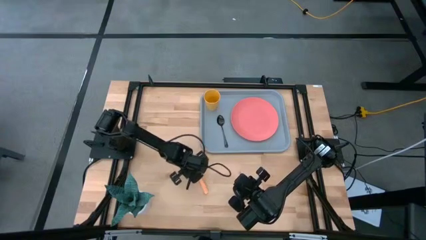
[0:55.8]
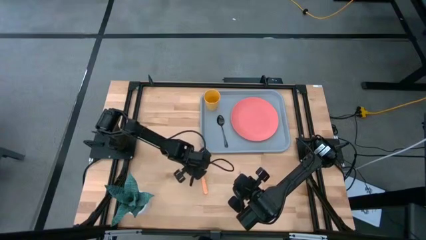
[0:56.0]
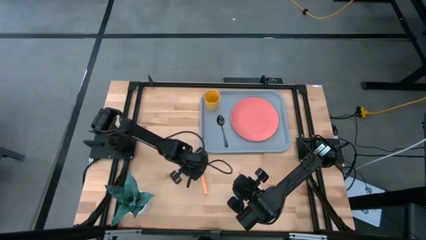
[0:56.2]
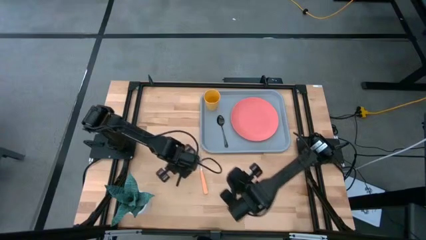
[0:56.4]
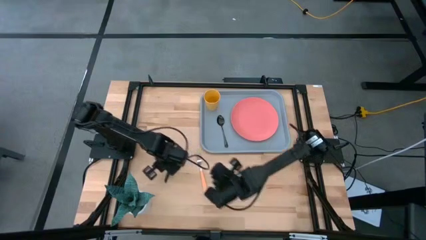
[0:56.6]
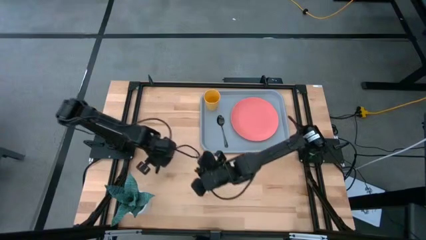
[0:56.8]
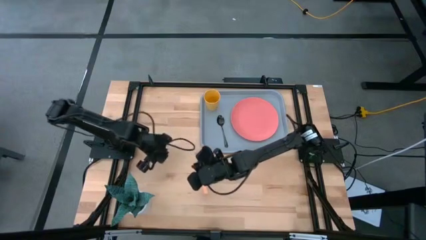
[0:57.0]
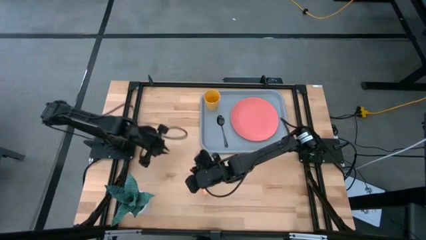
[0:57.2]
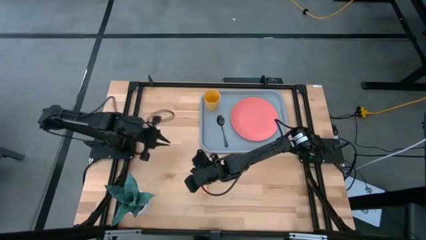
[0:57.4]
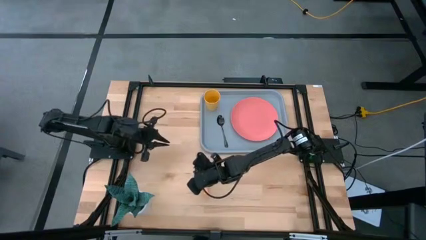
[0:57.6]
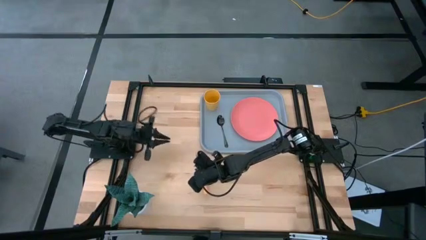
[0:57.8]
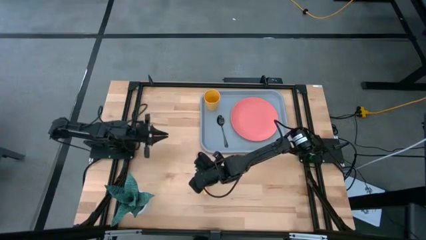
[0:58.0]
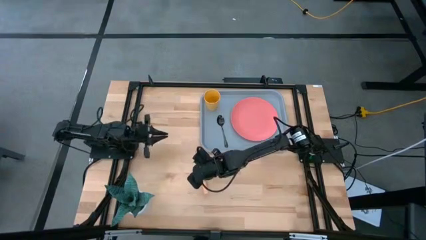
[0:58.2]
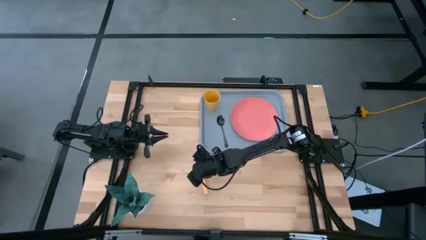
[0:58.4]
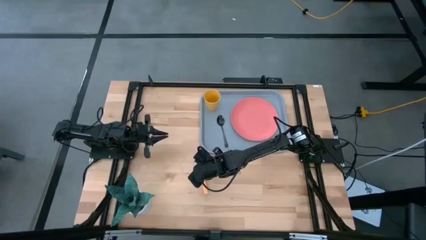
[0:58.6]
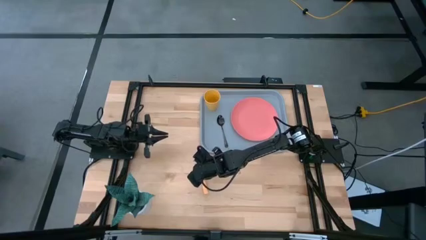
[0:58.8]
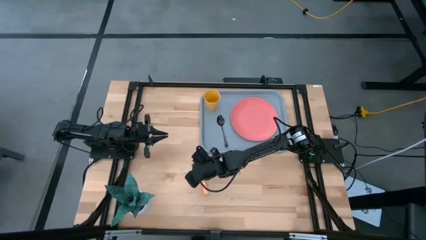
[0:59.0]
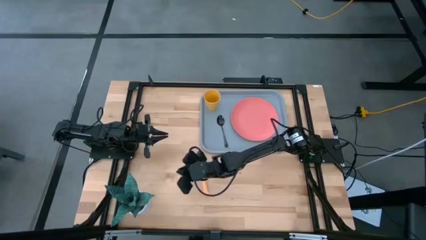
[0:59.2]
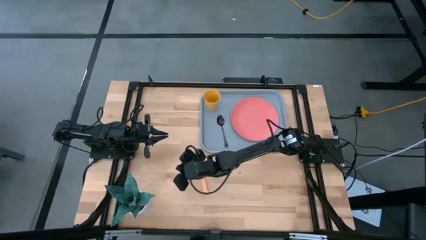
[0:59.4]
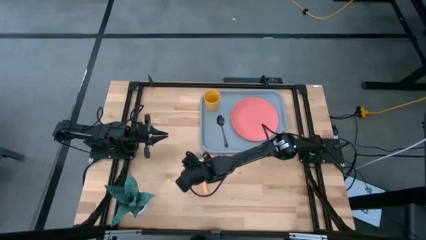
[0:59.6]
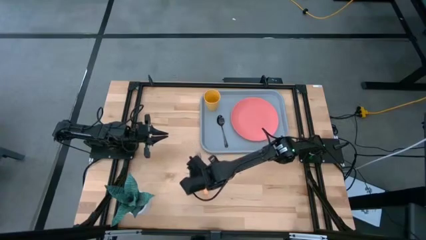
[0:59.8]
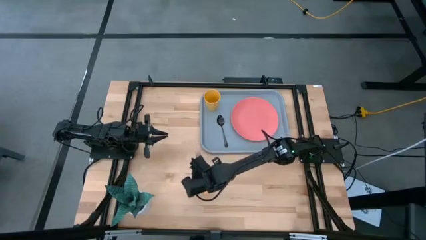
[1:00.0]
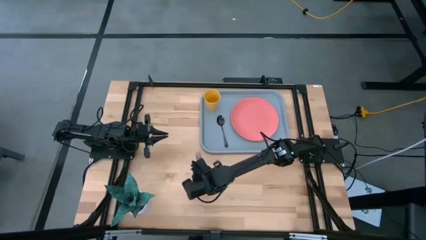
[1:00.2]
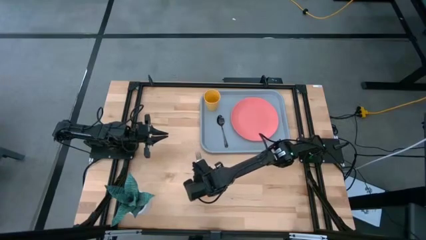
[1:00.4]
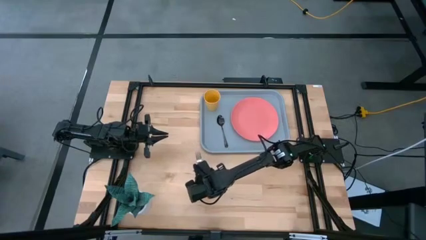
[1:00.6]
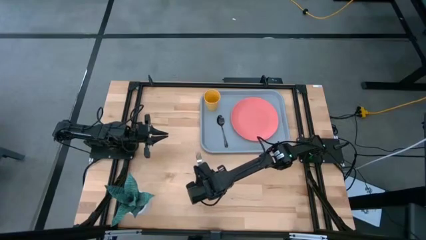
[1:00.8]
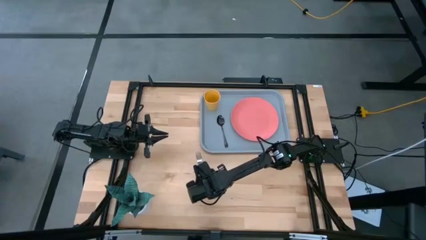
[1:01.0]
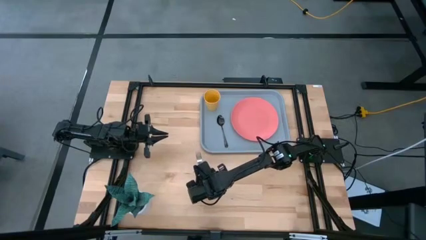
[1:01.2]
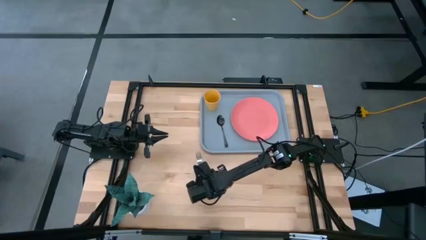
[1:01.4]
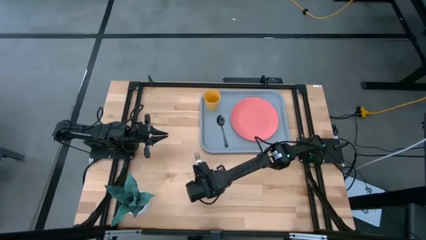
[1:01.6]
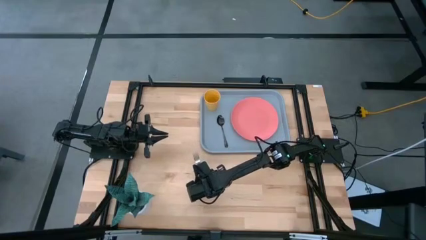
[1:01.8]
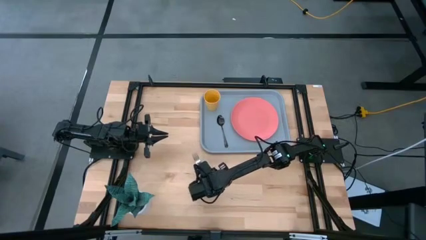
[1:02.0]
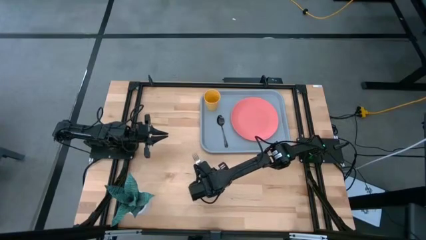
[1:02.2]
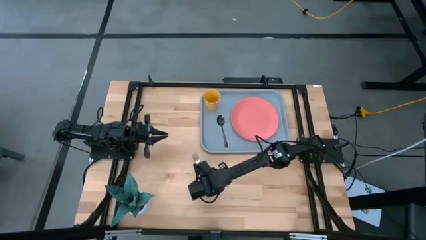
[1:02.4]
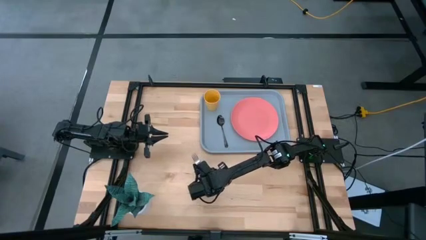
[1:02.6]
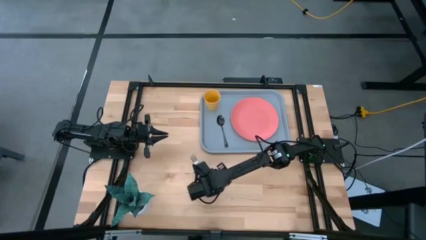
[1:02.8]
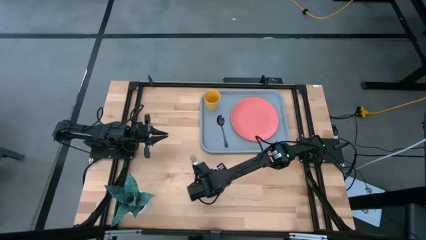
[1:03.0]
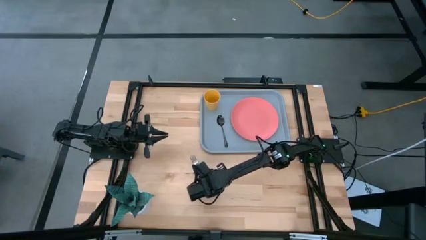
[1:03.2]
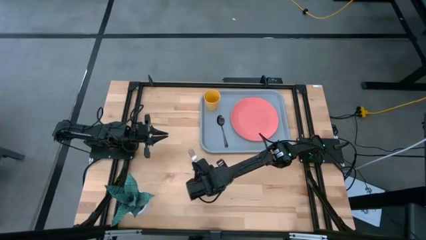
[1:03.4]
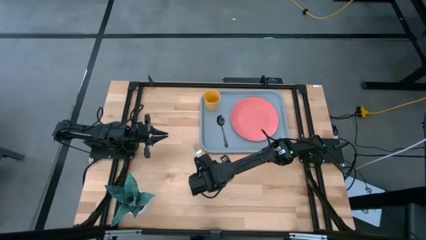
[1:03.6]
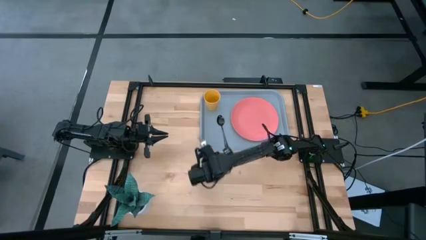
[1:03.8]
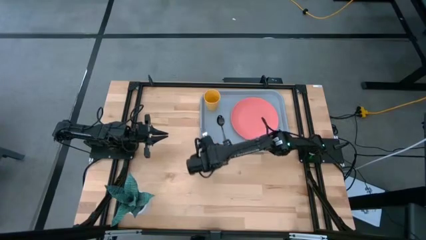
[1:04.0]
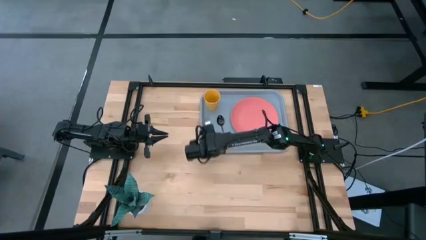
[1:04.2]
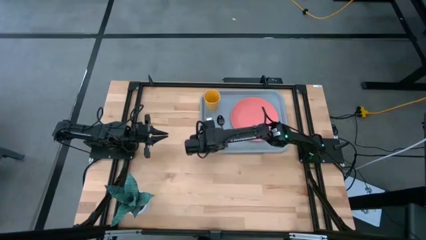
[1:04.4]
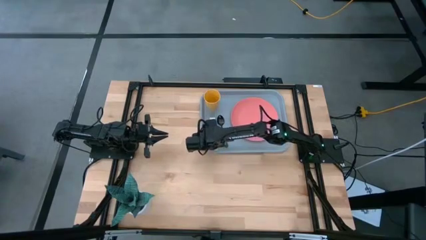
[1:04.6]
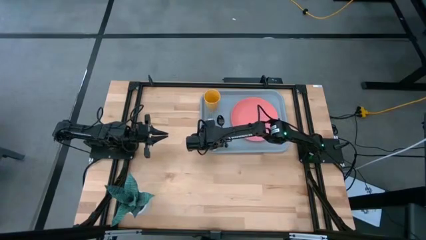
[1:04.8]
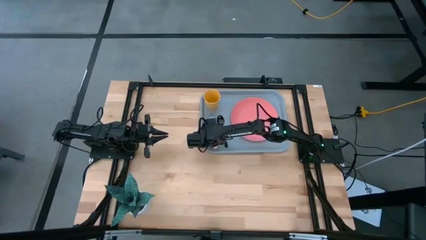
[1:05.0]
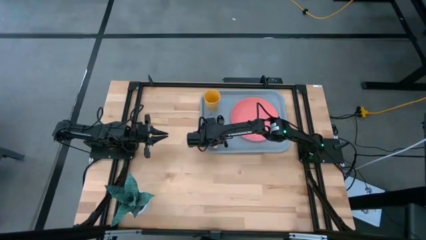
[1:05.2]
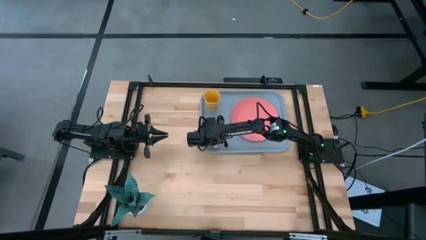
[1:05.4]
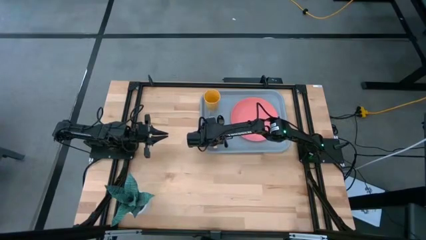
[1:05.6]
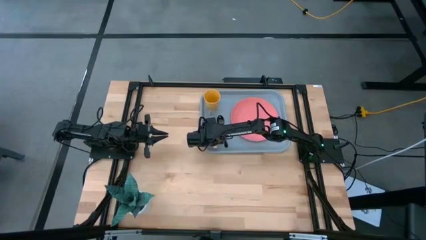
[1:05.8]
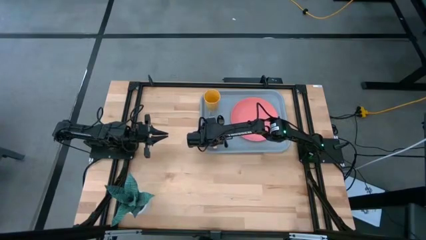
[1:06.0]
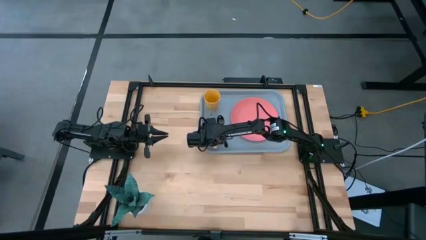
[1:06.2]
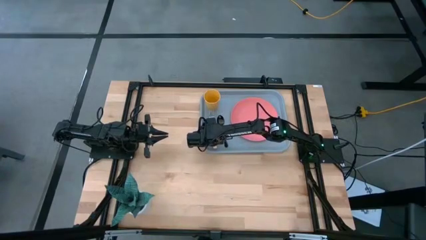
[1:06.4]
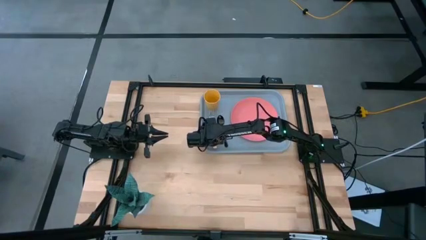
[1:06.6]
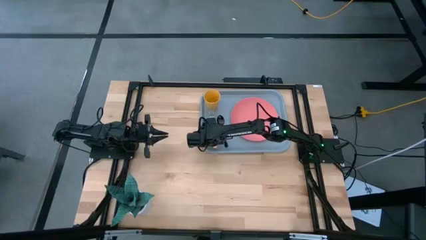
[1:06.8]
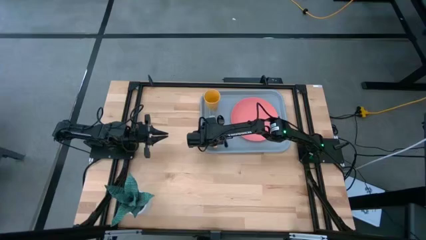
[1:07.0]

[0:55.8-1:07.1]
Task: Pick and place plate/cup/fork/spoon on tray
Put the orange fork on the gray tray to the left of the black spoon

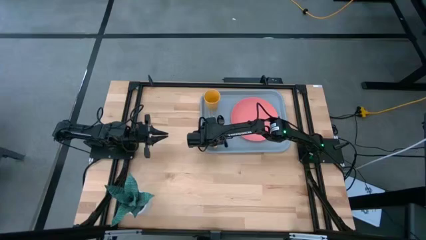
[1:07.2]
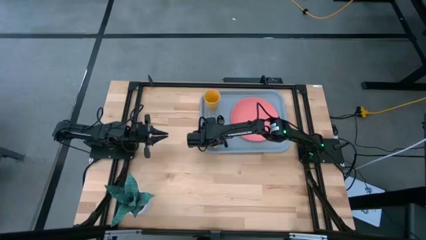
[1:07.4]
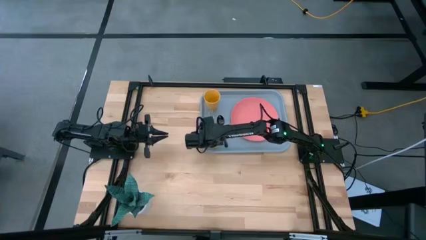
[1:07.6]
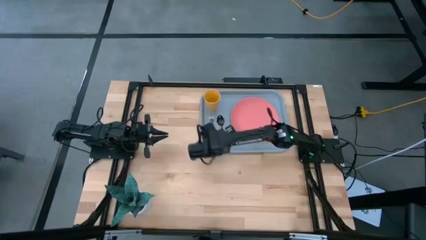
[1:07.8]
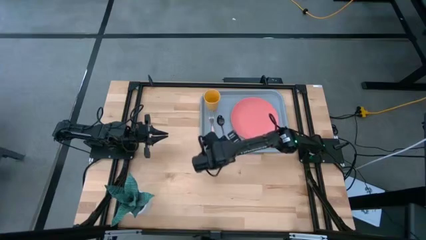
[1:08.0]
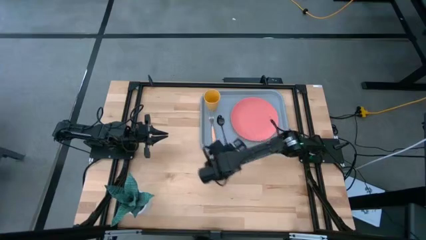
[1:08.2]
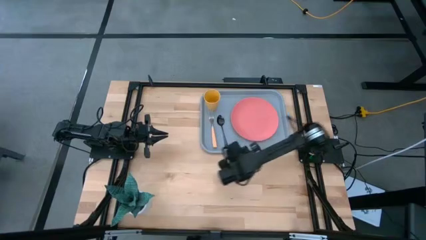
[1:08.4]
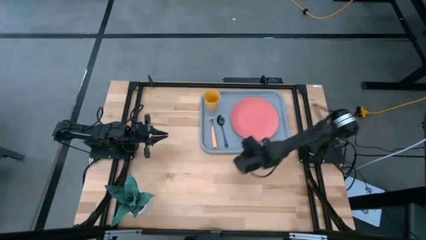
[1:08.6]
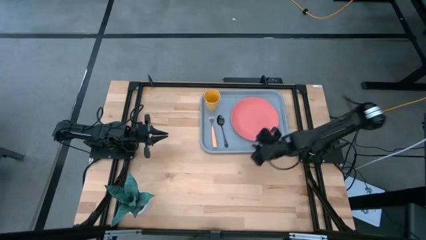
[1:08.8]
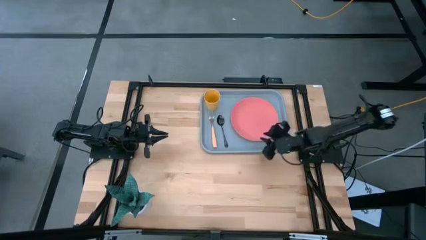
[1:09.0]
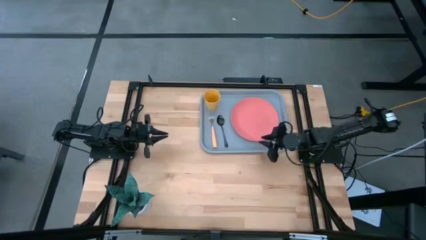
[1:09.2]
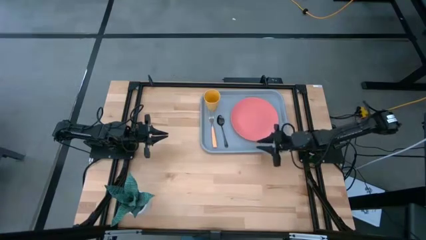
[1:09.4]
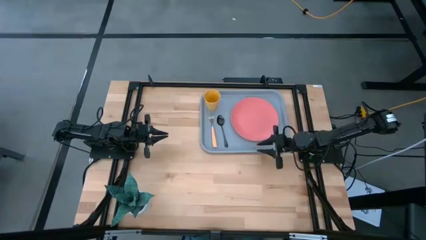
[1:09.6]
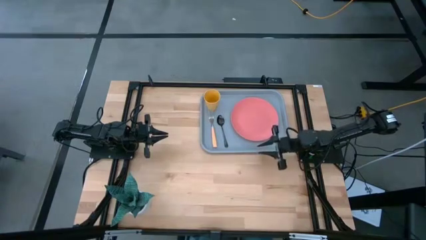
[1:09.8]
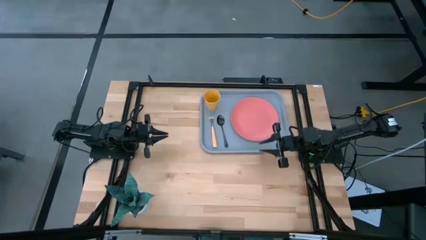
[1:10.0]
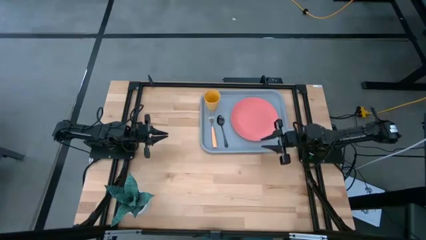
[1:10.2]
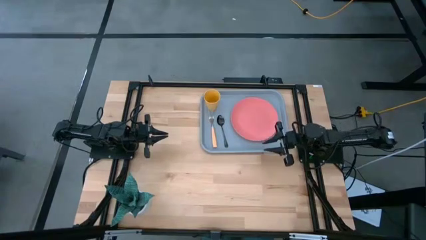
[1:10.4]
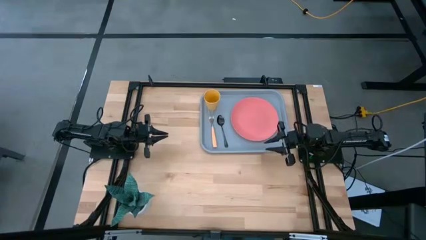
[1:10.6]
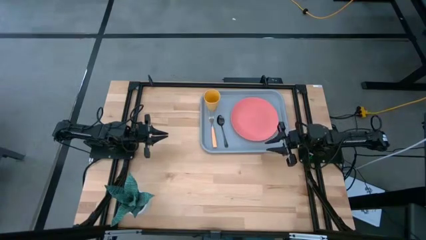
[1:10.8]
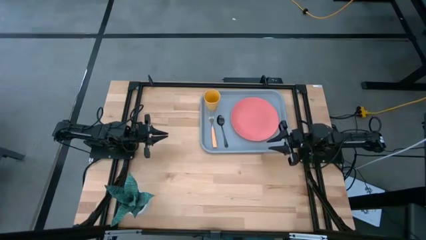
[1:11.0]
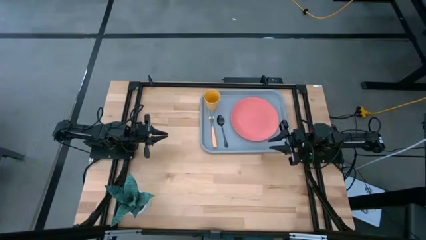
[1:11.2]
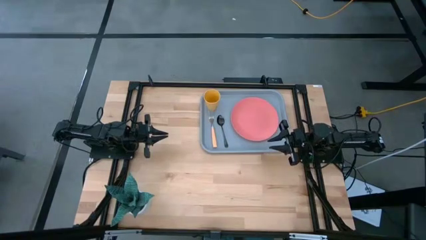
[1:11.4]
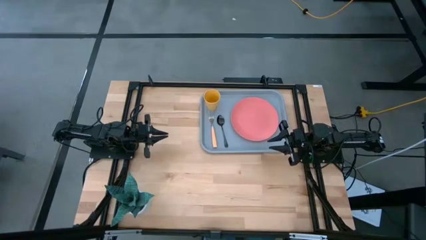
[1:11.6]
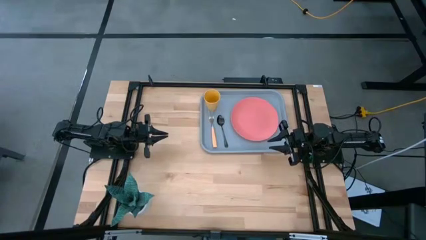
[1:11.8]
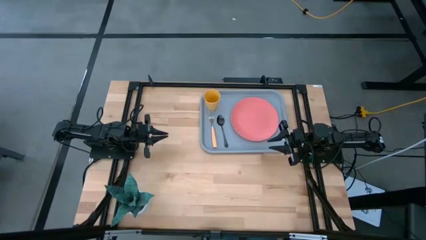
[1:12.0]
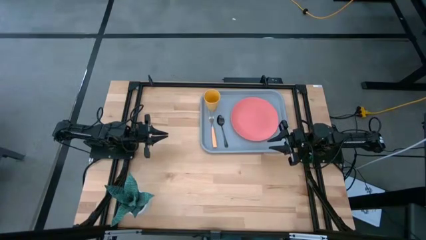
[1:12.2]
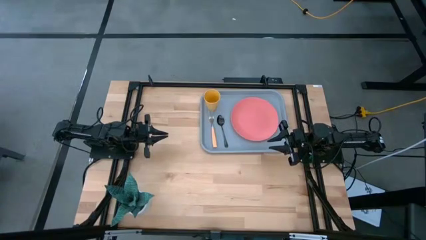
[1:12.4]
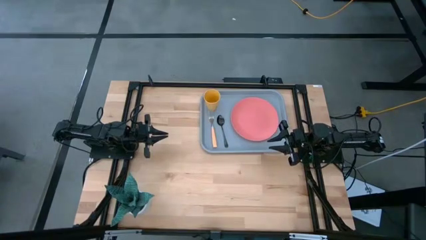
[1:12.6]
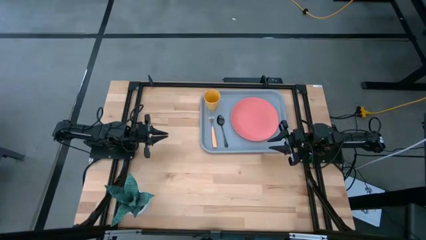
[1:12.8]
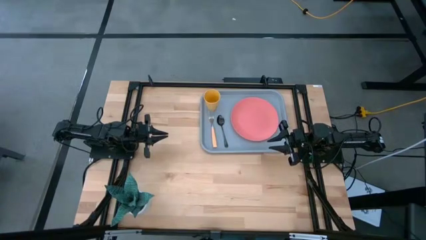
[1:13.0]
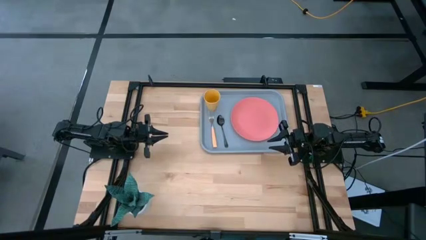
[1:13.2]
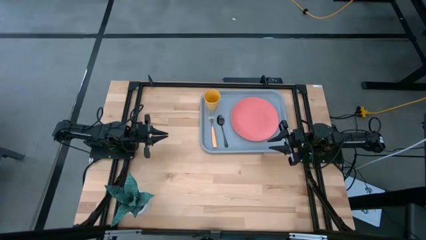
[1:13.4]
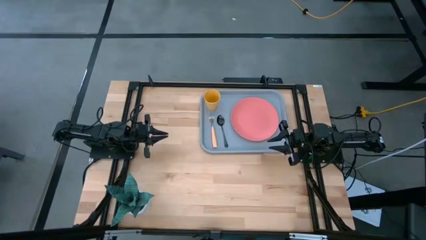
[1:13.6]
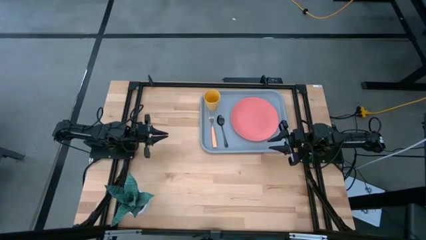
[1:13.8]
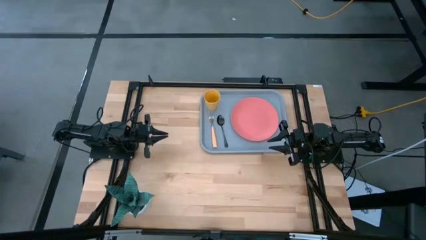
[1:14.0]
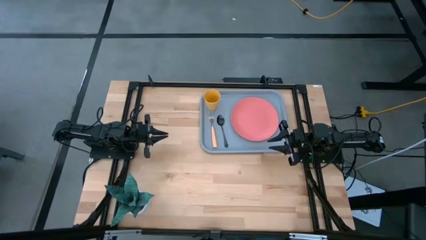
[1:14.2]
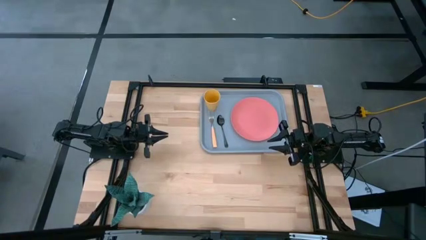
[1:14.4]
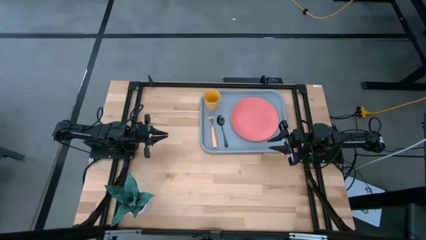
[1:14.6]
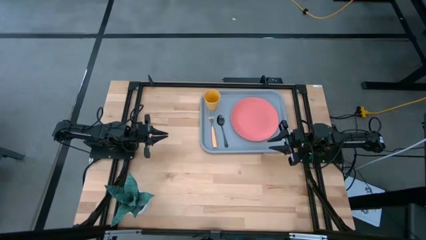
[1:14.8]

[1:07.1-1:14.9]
Return to Home Position
